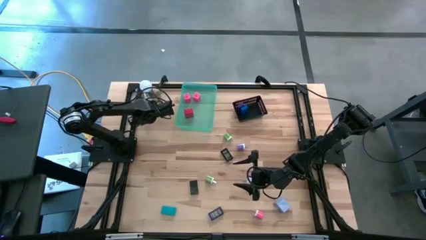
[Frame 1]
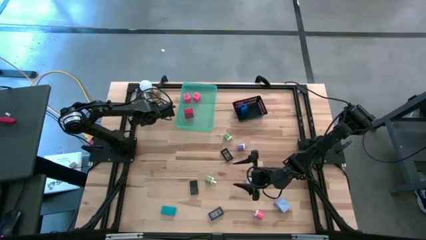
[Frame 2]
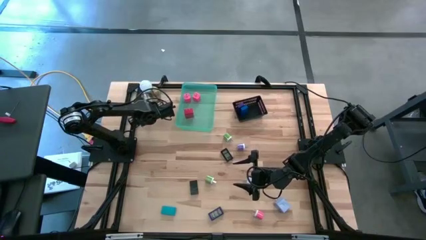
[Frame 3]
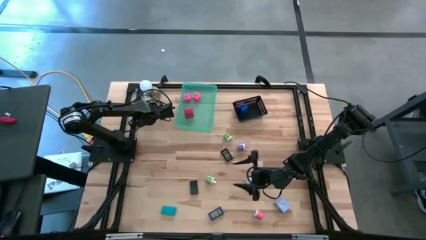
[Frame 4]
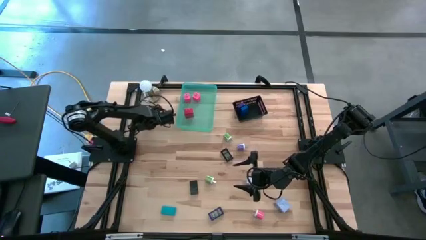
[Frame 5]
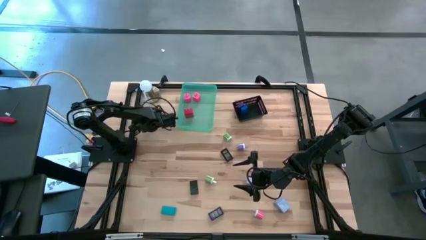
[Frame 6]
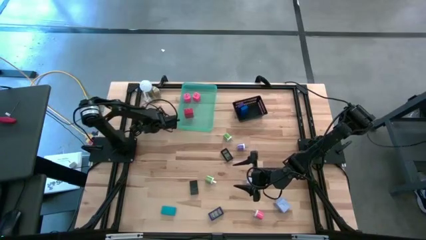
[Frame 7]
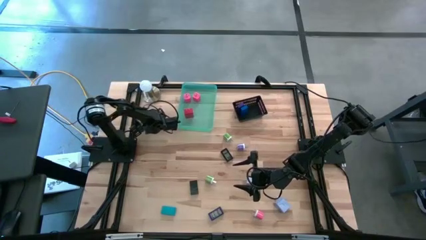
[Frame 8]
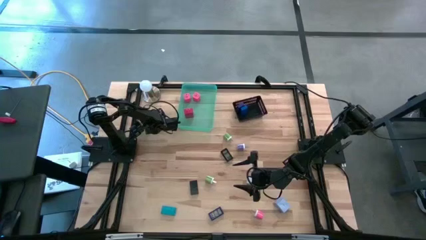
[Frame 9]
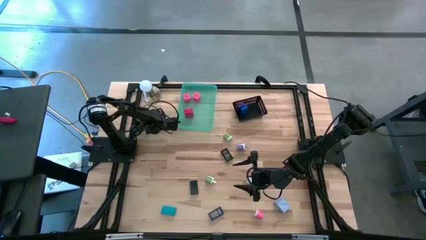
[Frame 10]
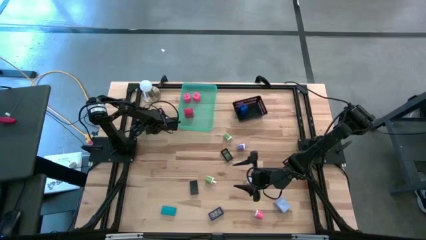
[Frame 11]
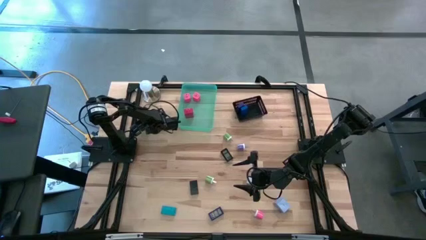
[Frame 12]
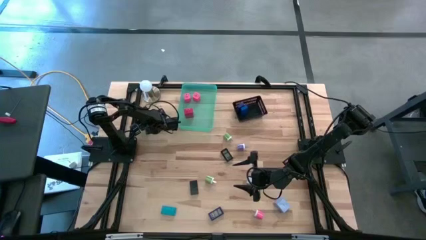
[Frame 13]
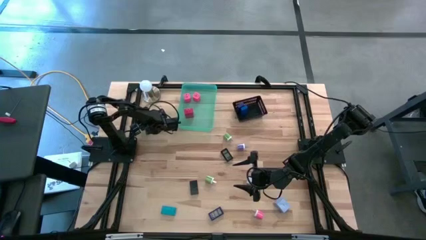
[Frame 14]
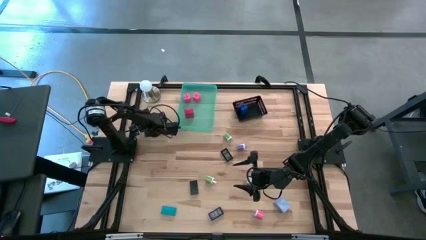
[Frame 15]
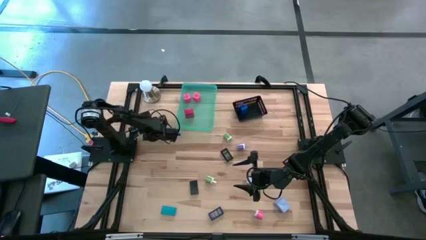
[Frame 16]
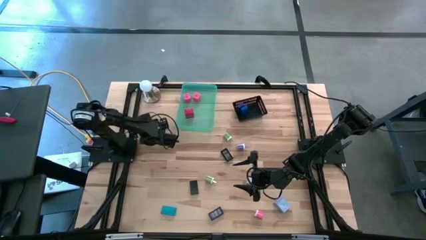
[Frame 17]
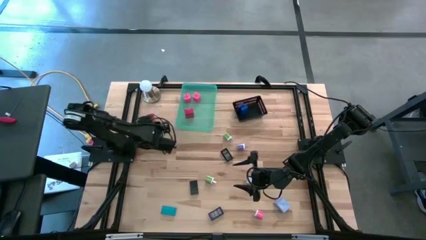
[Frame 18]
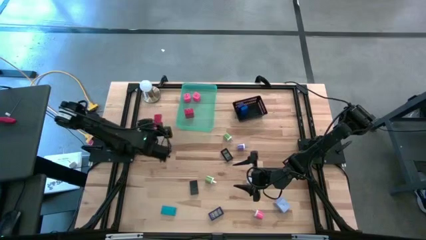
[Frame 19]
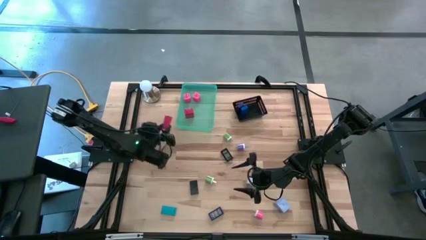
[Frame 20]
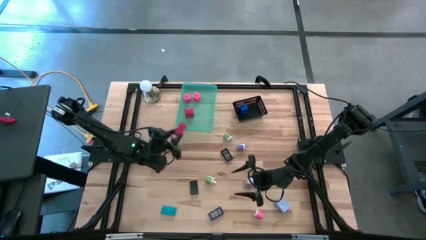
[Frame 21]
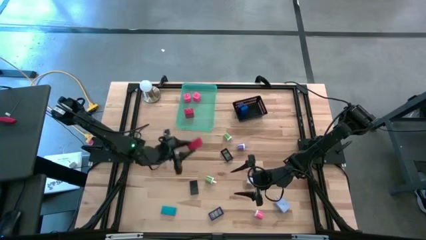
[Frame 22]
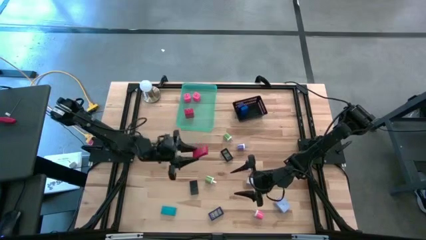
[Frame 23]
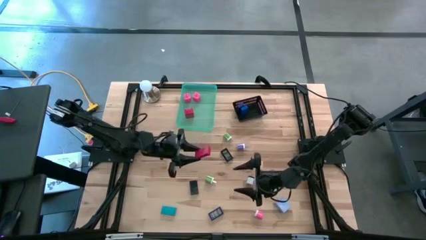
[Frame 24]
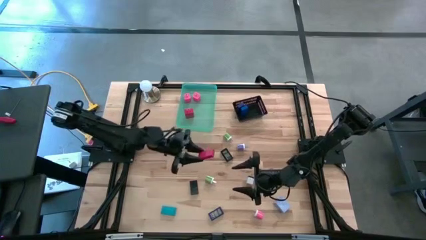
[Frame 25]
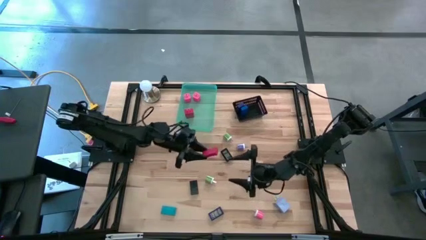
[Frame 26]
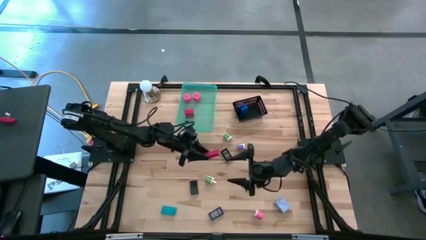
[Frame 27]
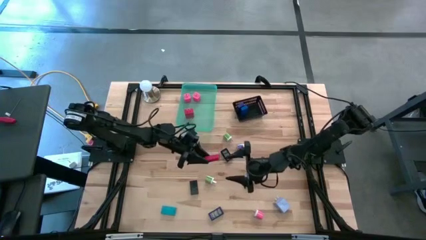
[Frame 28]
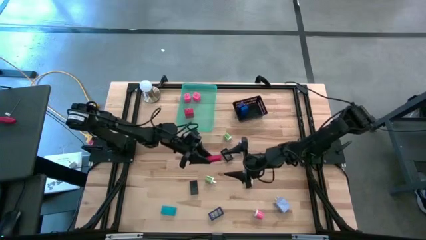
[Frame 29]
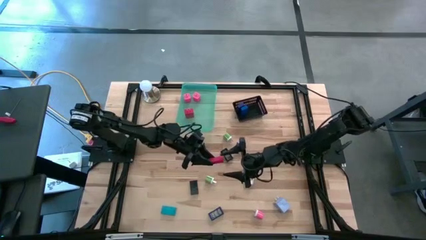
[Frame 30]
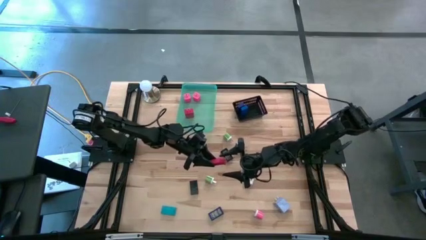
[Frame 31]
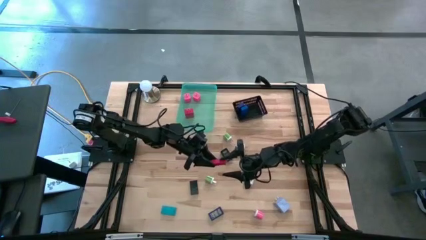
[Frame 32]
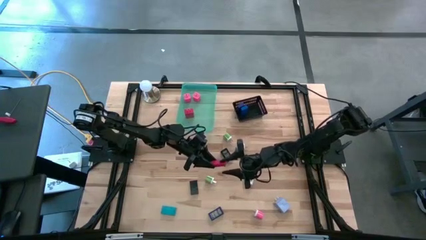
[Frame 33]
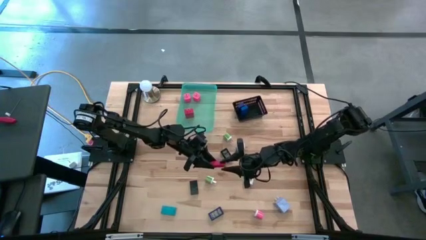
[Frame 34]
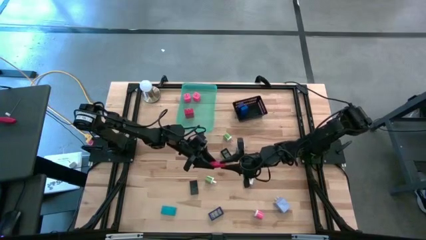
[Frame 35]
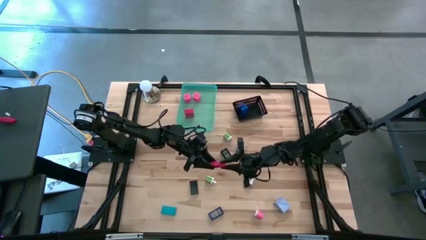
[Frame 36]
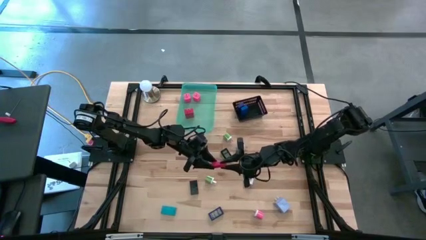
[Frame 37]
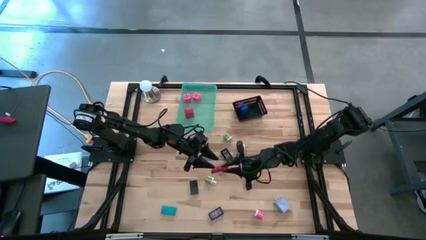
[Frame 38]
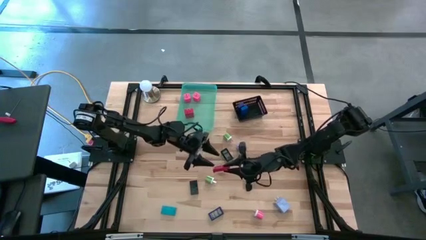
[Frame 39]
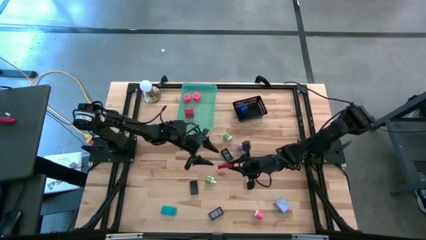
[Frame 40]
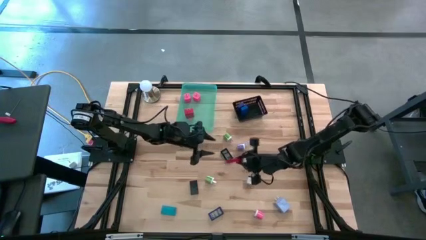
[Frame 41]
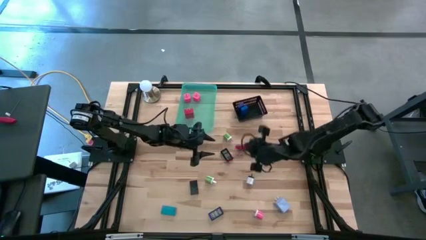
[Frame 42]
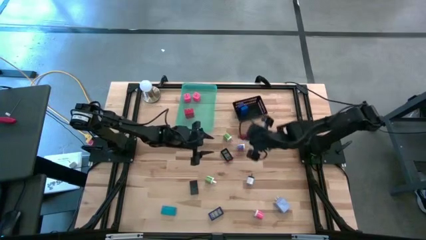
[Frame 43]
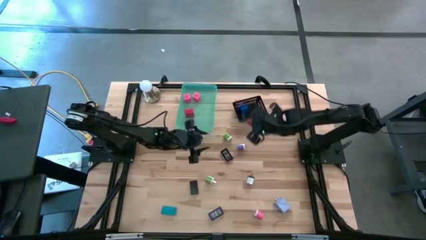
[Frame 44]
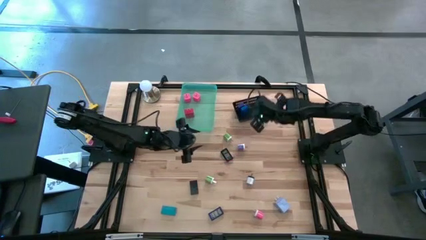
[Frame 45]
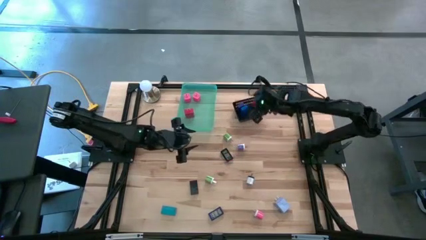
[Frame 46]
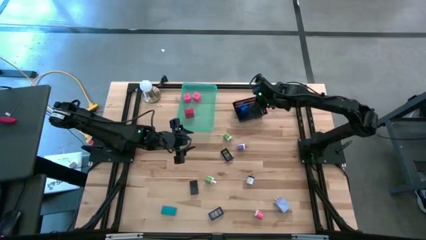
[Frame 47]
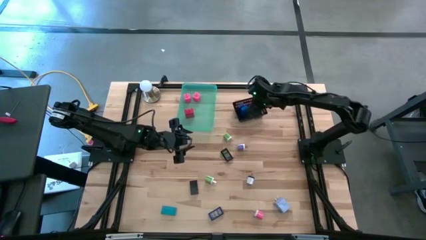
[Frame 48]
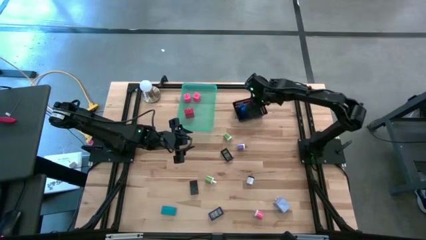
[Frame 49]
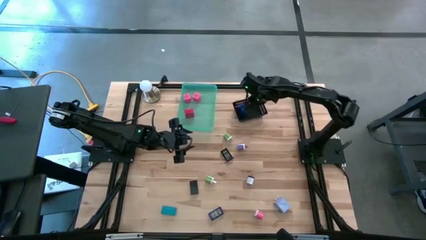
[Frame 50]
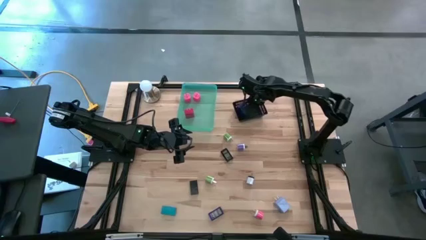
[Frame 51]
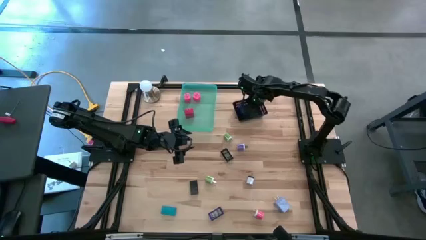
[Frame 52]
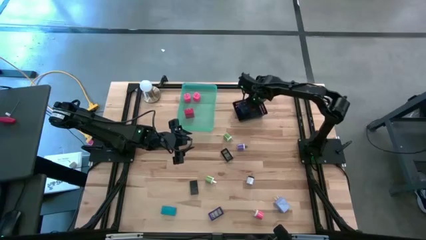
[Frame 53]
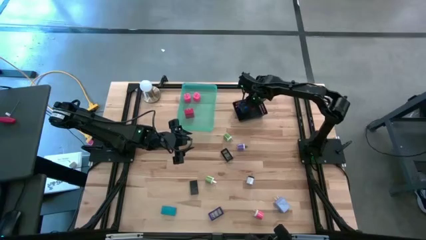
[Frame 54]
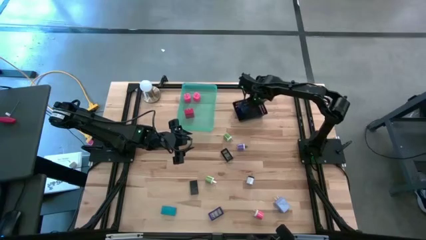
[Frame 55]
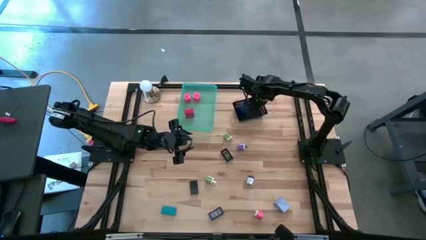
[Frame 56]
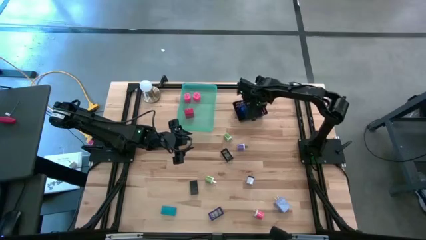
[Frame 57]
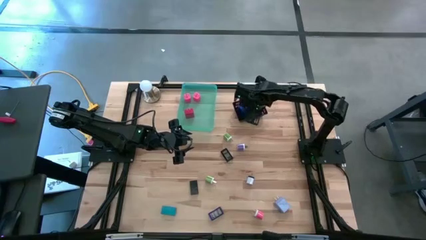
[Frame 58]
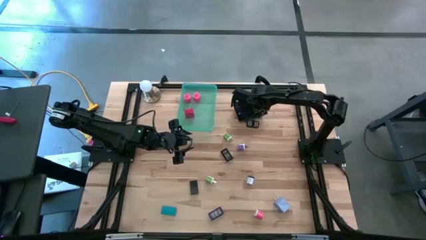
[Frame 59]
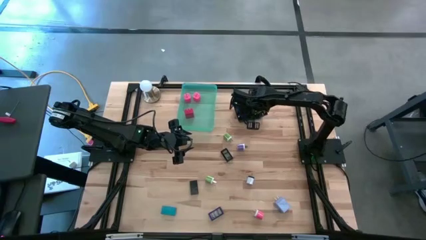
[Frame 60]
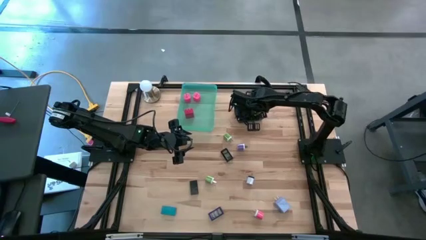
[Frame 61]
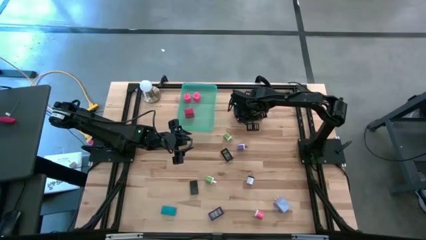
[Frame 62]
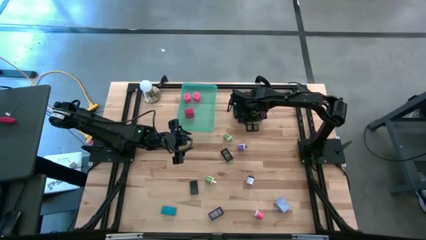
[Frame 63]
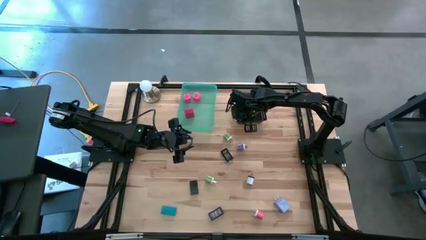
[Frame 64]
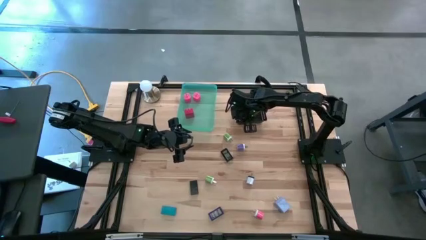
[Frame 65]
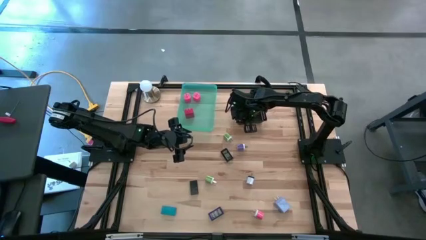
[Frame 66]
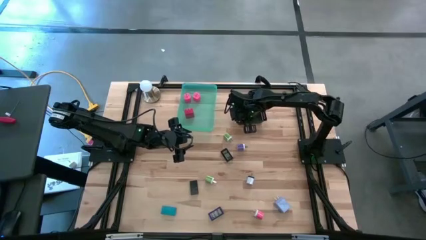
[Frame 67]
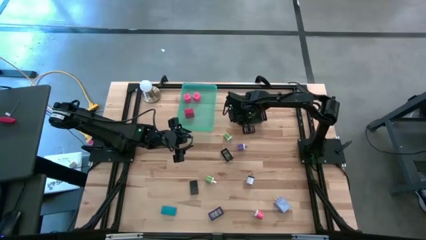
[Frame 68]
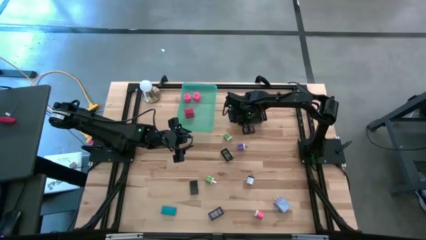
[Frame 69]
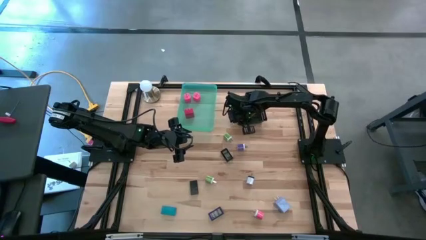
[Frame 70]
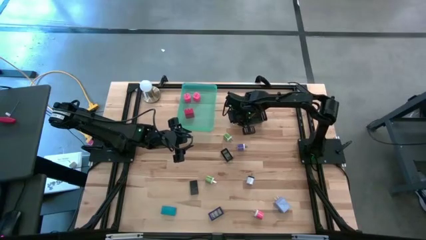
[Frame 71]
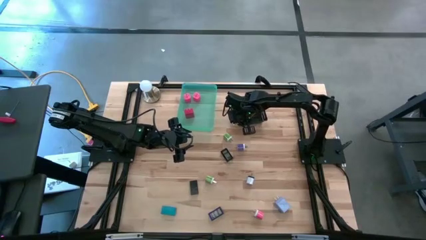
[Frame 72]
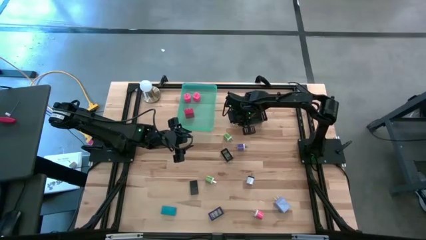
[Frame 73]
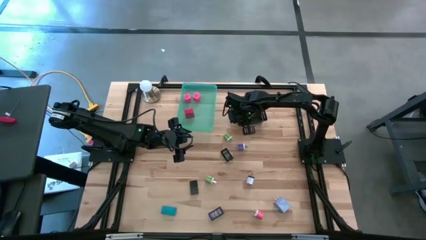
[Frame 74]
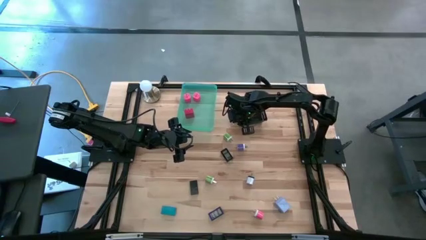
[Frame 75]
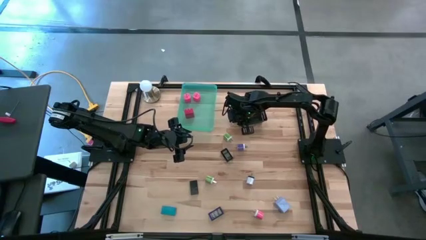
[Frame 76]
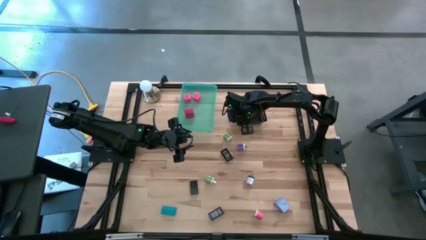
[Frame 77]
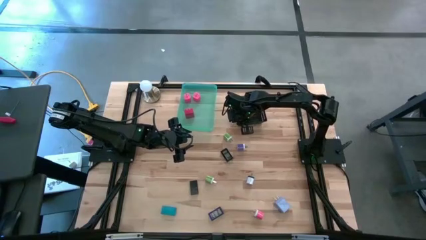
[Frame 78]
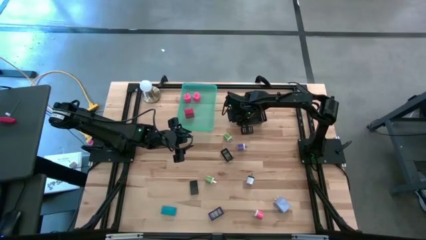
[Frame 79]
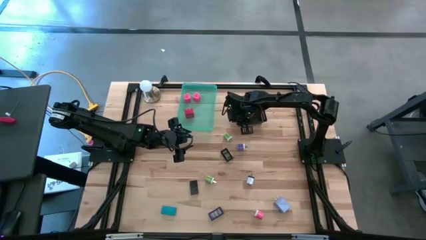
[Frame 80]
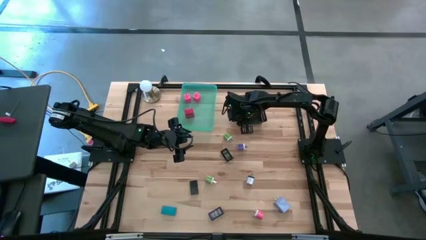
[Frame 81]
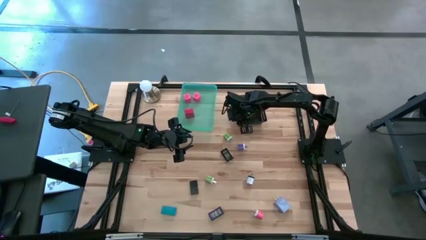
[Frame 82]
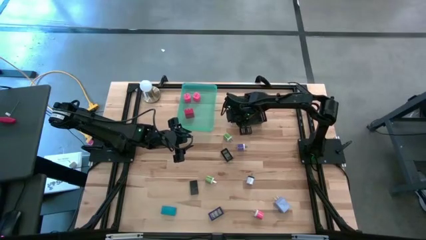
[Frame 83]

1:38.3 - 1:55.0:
Task: Pick & Place Office items
Put the red digital clock into the black bin
